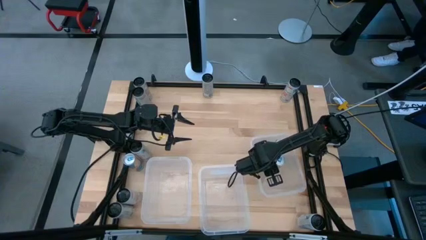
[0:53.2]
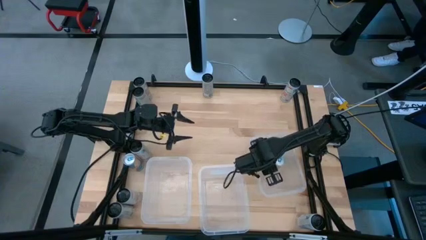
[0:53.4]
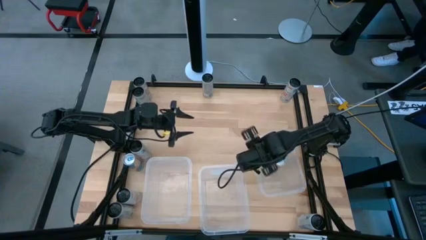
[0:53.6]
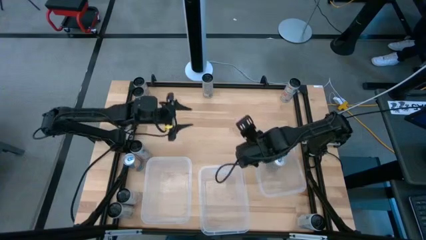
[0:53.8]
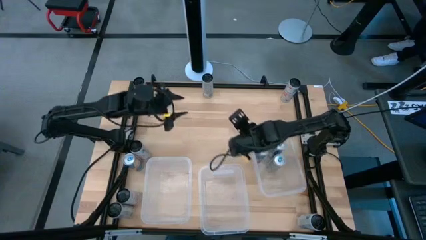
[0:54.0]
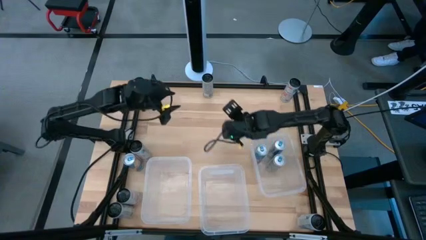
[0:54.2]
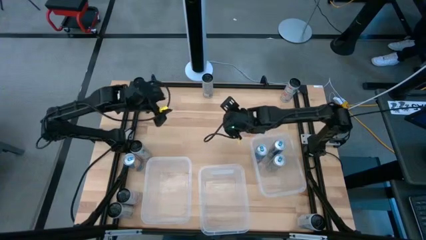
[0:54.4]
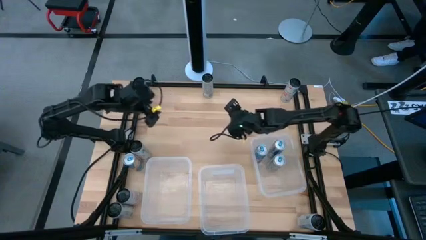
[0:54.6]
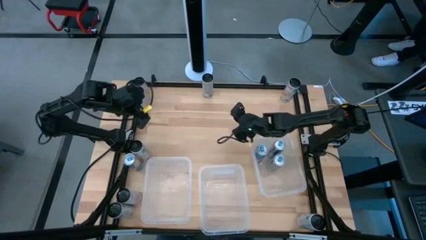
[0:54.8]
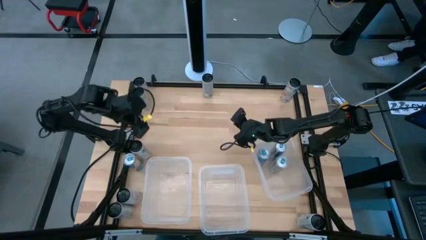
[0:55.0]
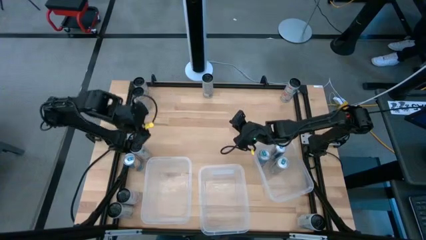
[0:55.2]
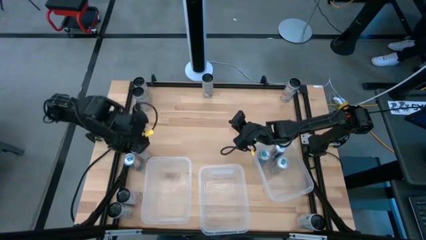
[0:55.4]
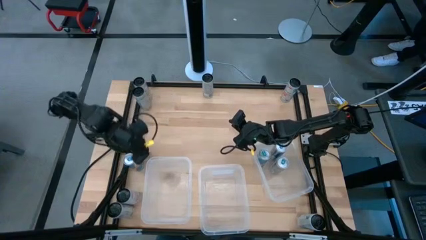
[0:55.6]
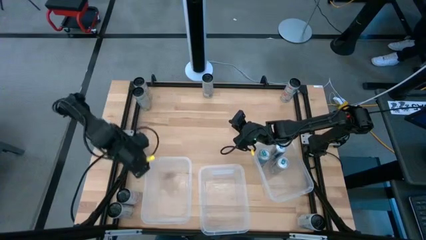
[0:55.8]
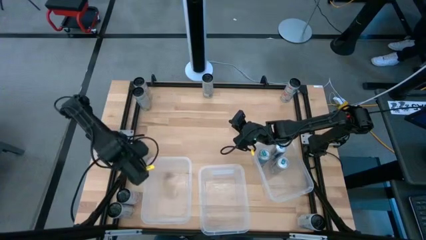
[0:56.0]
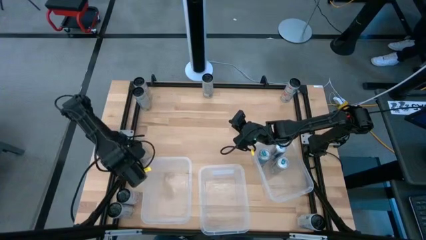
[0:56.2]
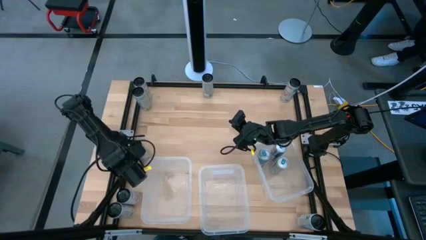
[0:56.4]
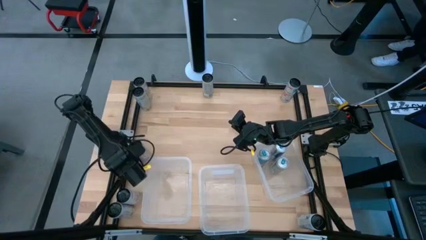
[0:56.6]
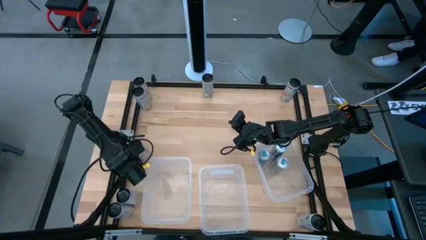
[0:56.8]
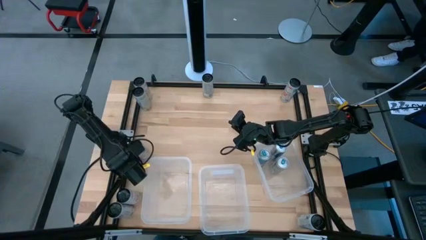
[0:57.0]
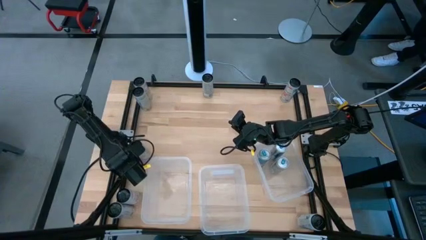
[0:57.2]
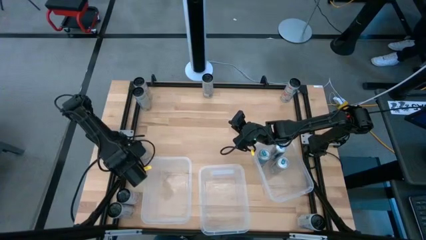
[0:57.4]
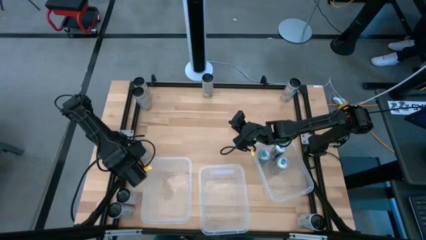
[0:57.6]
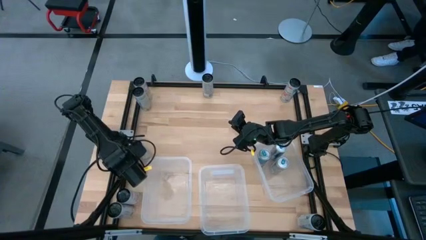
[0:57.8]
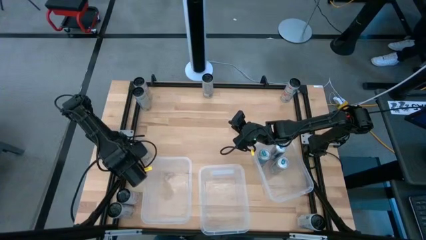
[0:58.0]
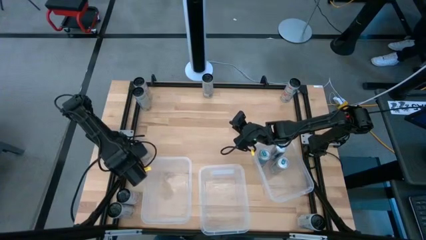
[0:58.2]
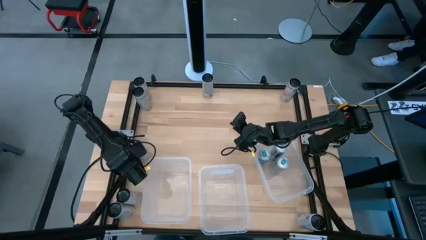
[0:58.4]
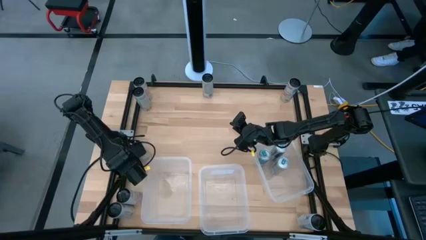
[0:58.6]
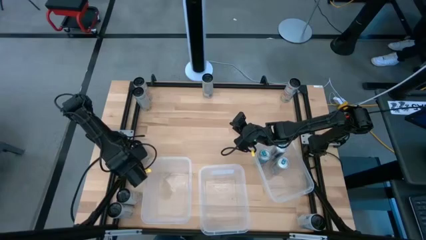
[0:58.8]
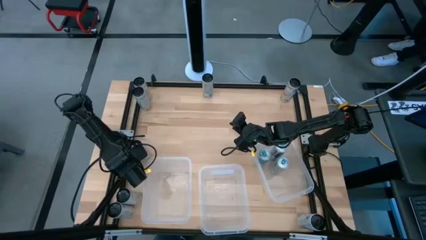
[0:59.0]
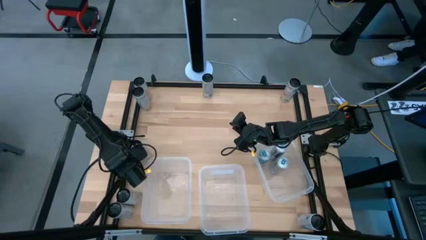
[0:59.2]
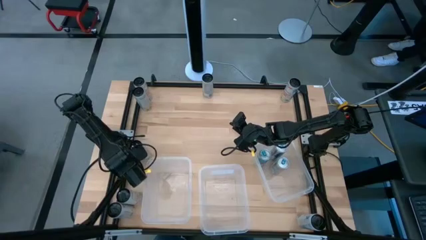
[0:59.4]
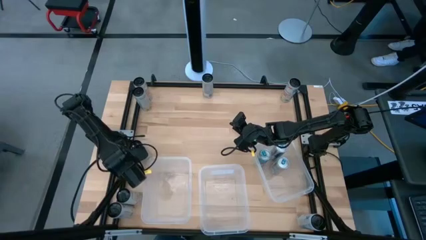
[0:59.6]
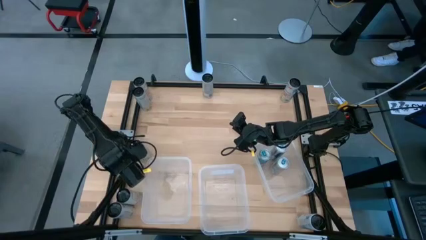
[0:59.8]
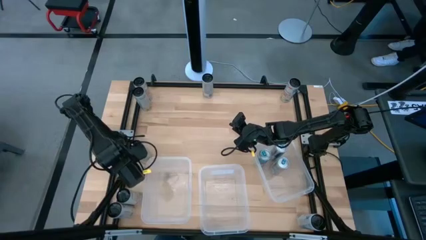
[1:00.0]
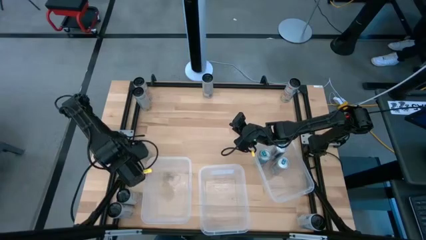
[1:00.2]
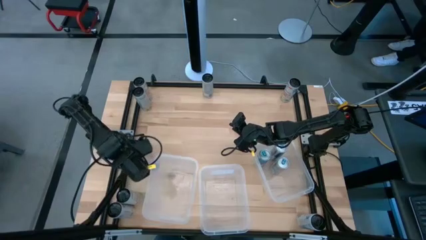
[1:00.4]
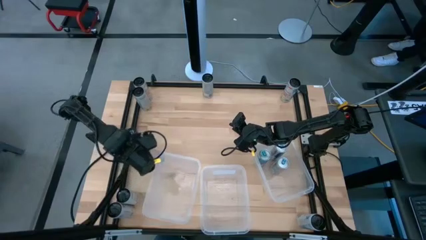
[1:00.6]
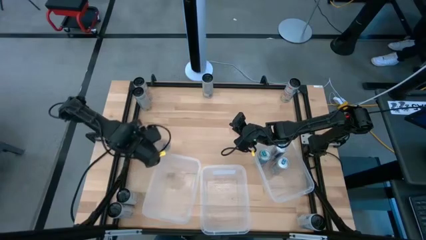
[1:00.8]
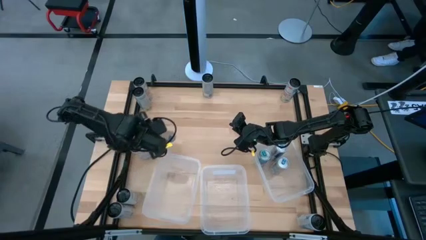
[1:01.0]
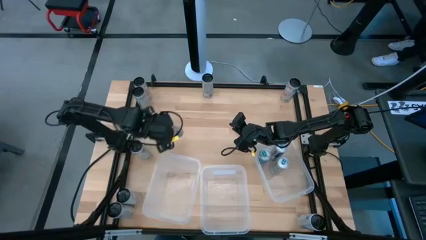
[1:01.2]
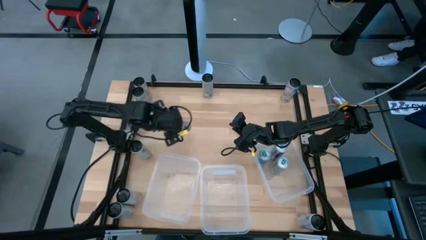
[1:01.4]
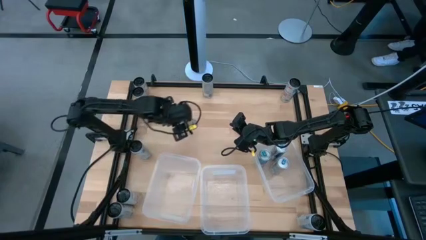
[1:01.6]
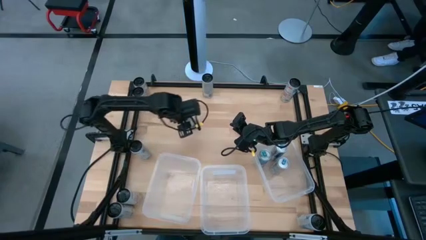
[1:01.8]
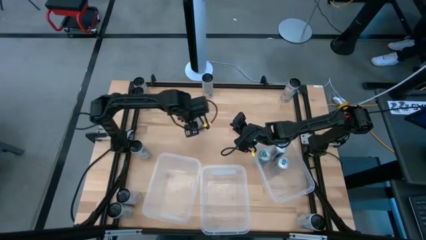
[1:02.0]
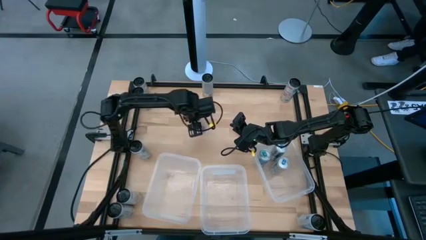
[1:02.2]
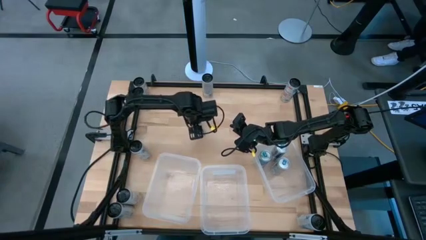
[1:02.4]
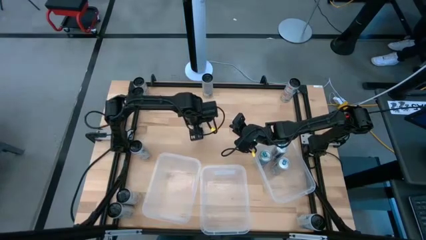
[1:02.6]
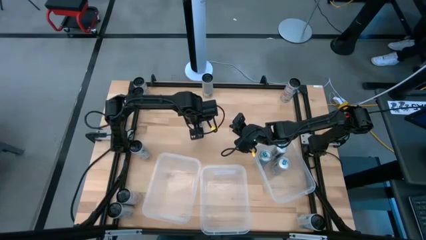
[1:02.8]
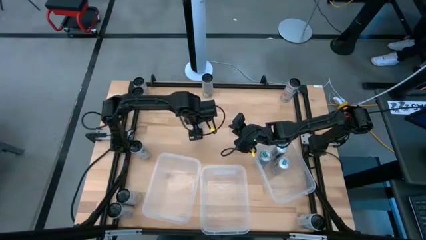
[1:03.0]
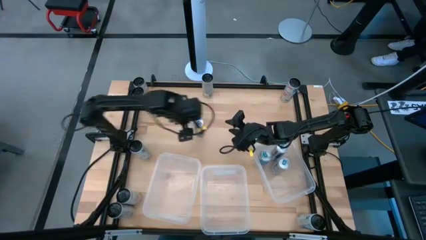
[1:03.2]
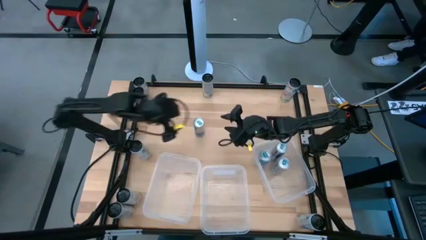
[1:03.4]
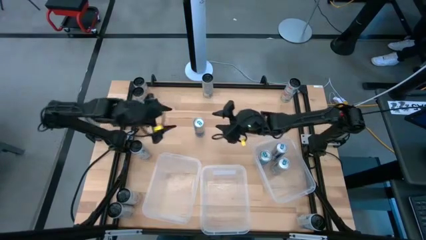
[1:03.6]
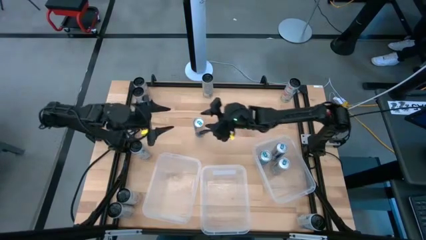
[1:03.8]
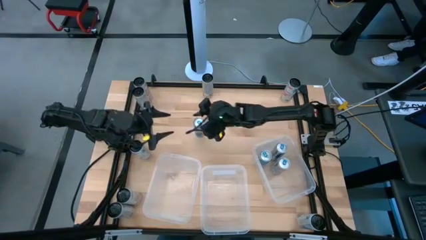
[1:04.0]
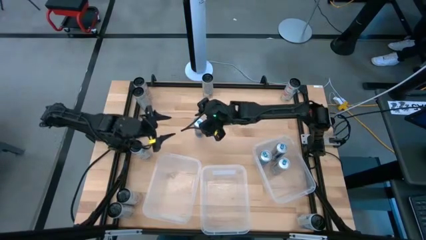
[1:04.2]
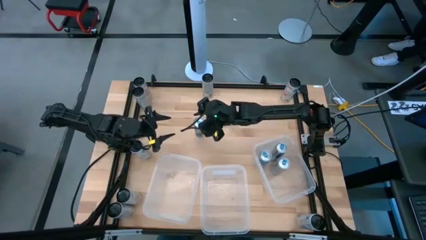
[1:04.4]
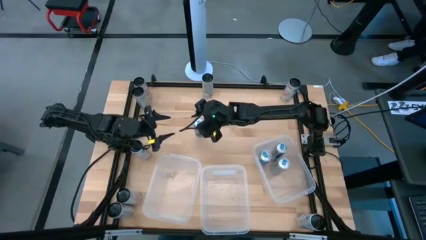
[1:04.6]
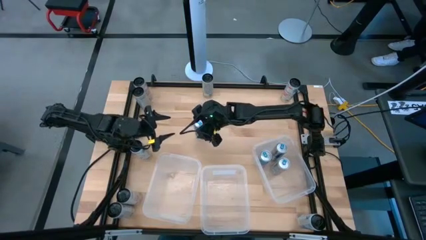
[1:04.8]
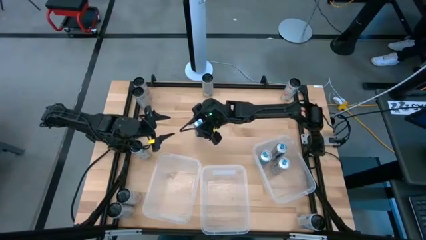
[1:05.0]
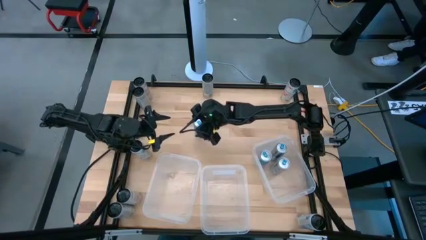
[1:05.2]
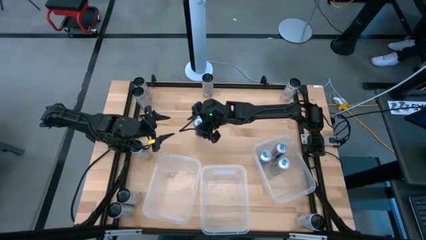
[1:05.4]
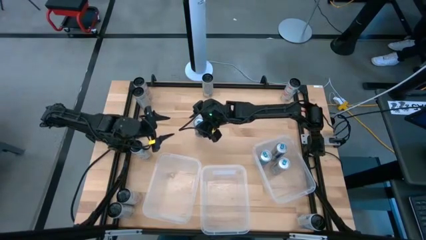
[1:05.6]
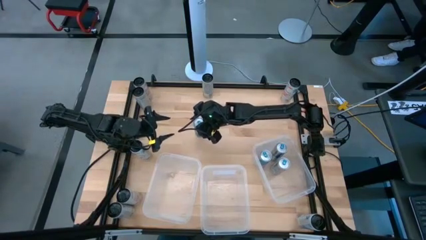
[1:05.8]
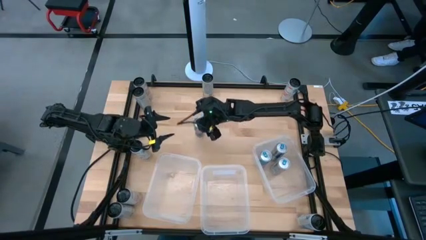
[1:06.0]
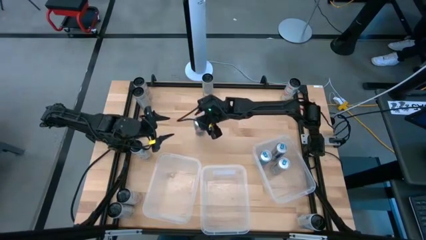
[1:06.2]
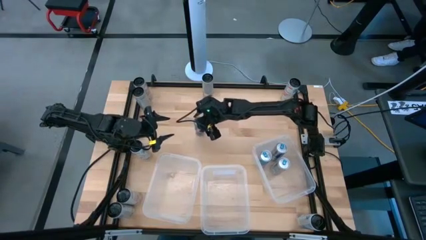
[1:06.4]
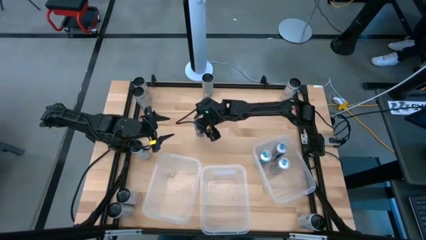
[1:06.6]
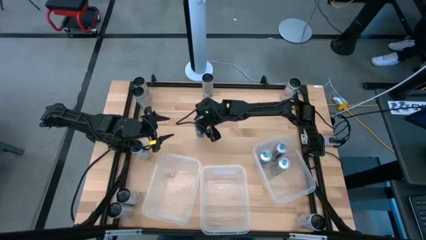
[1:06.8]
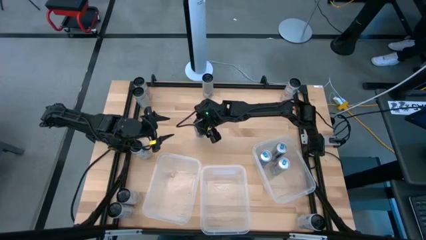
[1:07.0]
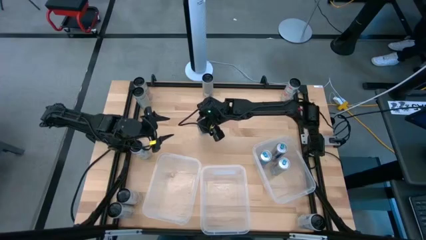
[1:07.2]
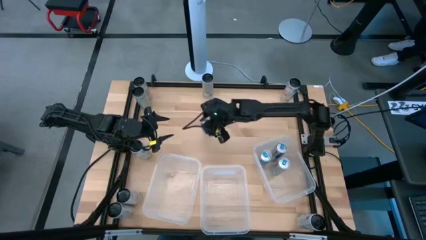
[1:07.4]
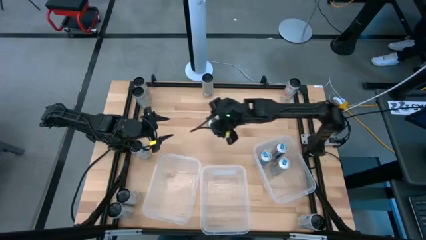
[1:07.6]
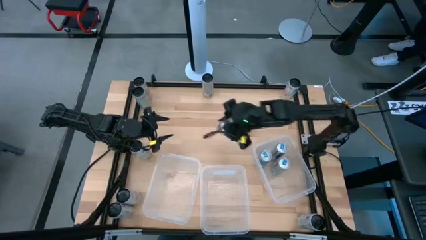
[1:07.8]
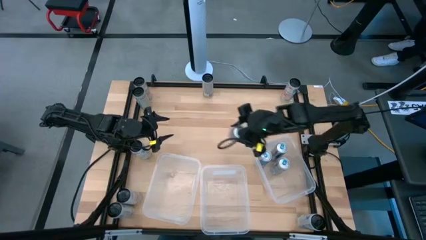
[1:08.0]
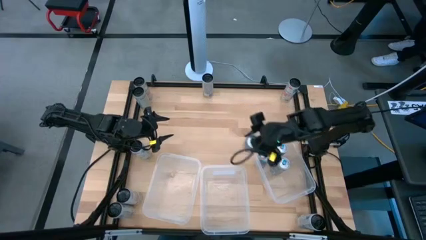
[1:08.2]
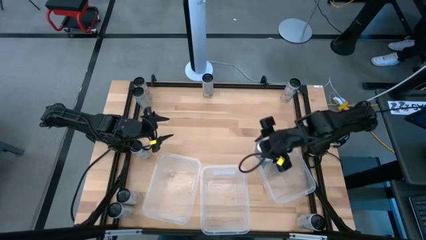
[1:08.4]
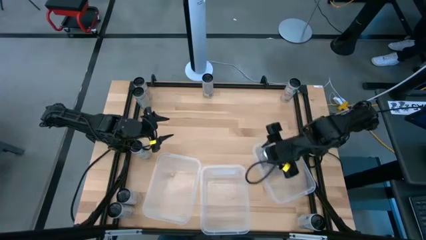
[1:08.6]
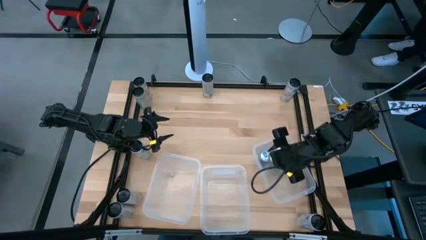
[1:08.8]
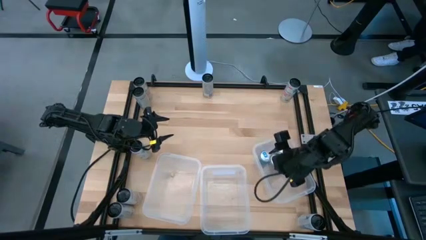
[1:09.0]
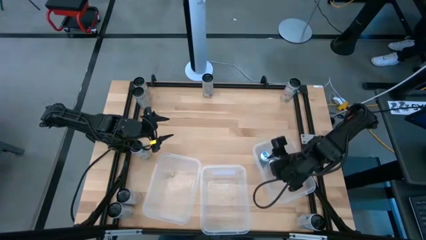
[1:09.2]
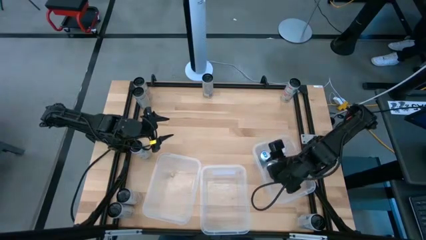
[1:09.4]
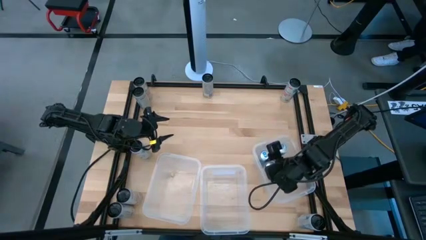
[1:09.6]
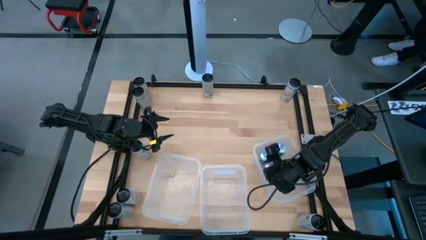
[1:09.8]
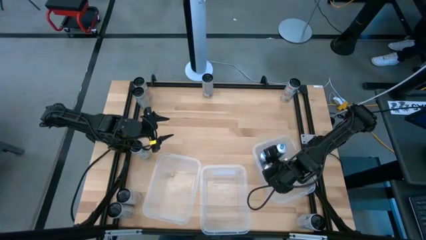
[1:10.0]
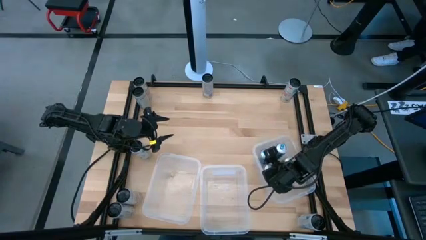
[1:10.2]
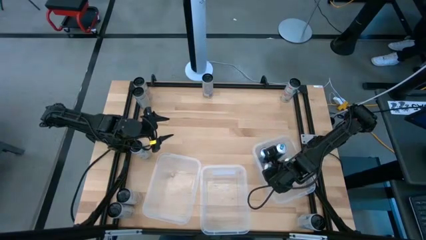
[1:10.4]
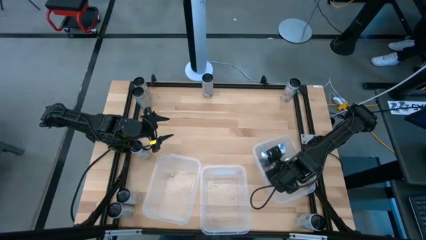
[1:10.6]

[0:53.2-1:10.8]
Task: Sort soda cans
Put the blue soda can into the right transparent bin
